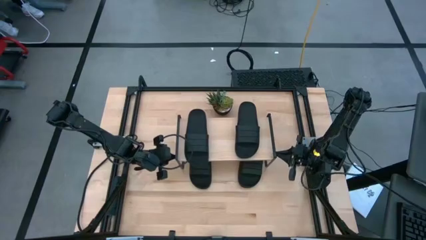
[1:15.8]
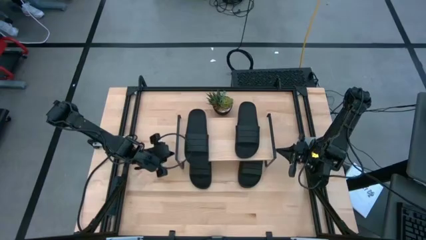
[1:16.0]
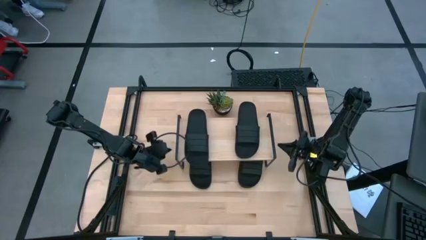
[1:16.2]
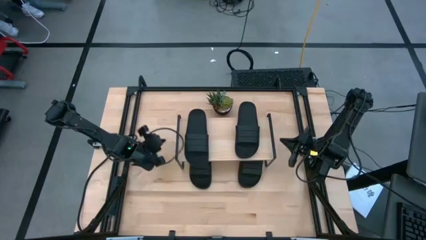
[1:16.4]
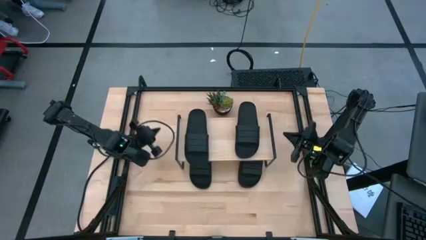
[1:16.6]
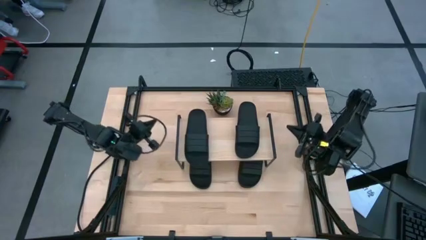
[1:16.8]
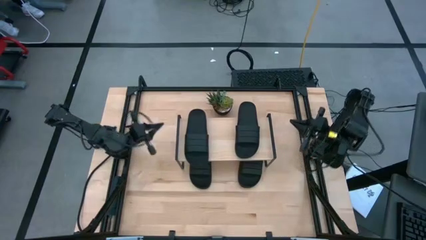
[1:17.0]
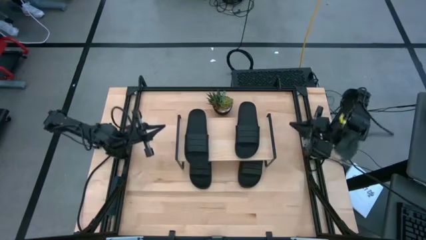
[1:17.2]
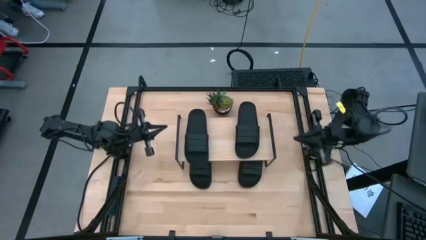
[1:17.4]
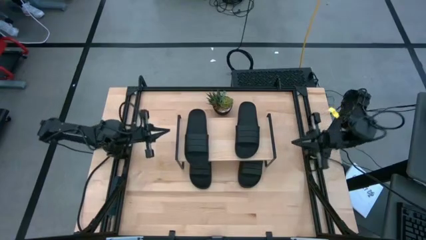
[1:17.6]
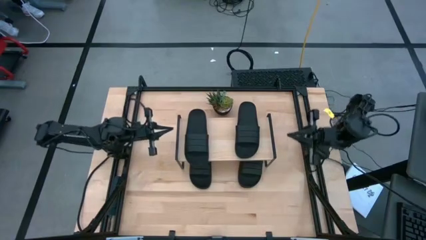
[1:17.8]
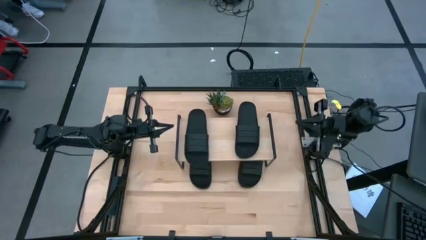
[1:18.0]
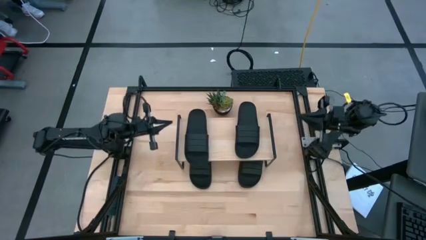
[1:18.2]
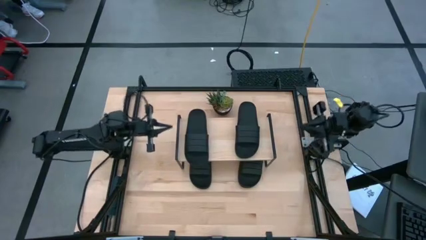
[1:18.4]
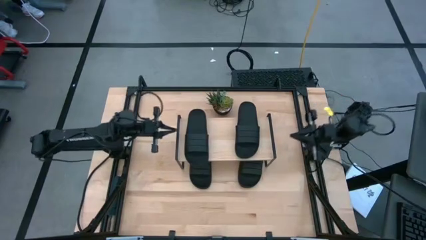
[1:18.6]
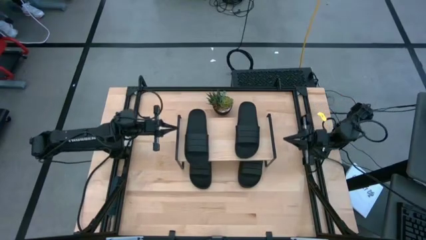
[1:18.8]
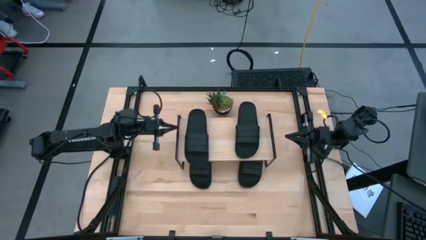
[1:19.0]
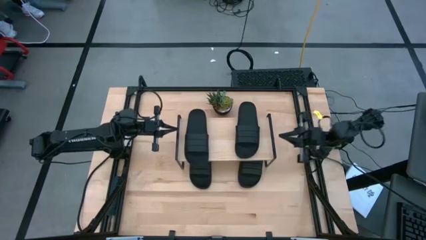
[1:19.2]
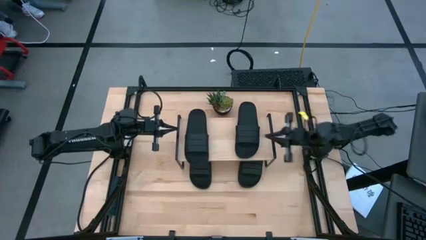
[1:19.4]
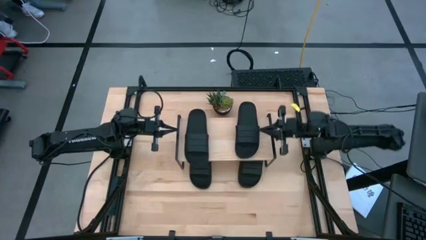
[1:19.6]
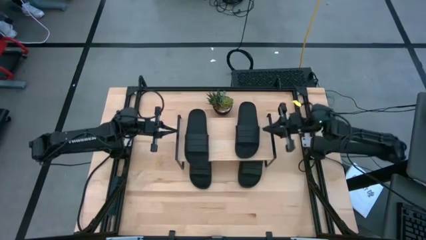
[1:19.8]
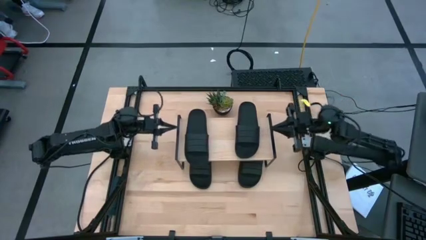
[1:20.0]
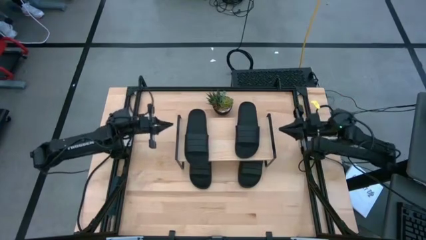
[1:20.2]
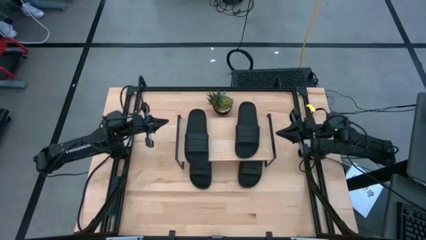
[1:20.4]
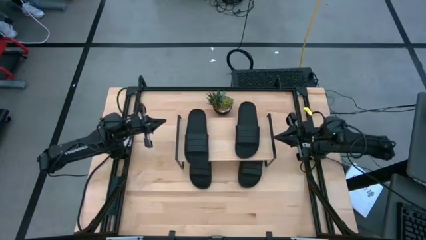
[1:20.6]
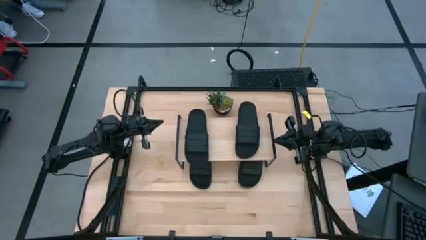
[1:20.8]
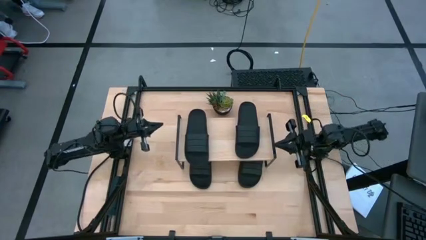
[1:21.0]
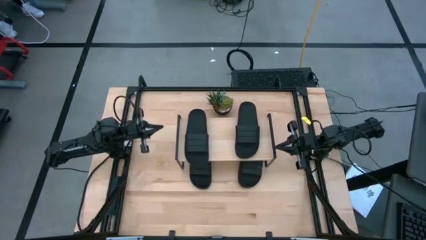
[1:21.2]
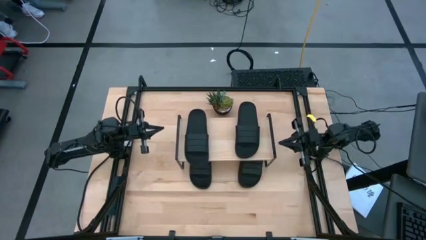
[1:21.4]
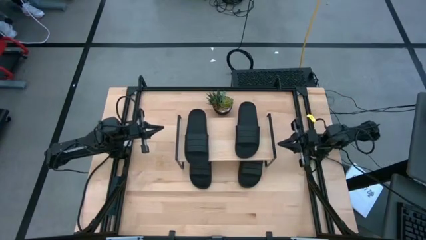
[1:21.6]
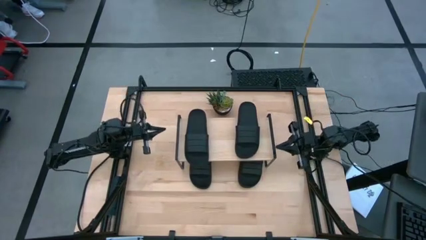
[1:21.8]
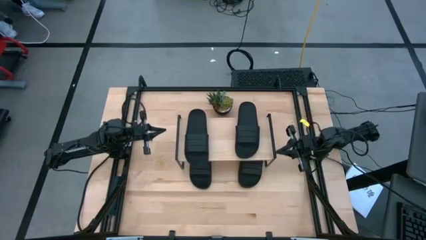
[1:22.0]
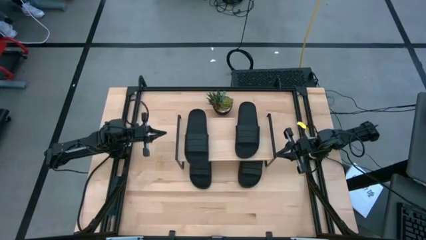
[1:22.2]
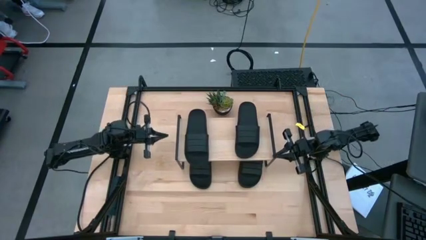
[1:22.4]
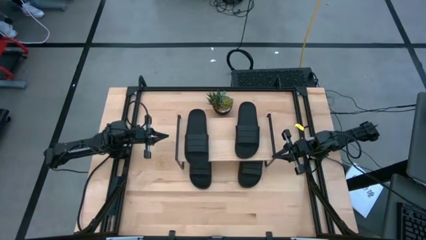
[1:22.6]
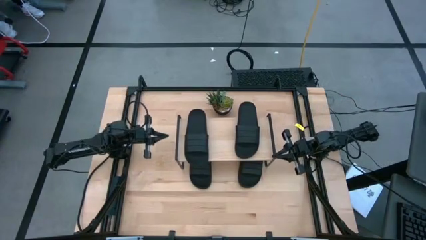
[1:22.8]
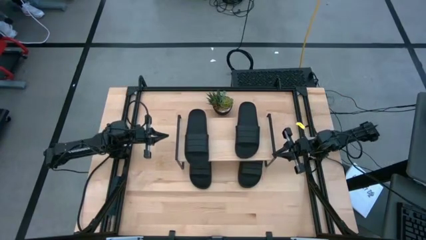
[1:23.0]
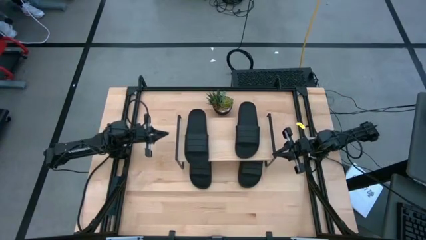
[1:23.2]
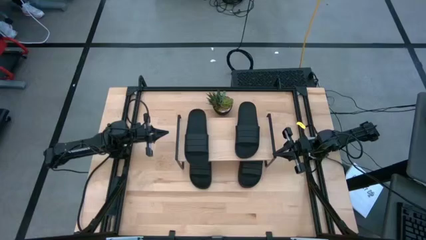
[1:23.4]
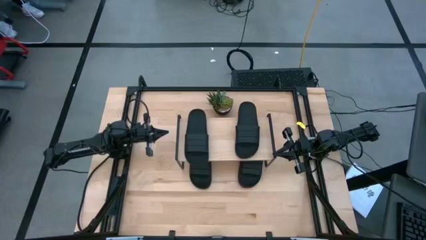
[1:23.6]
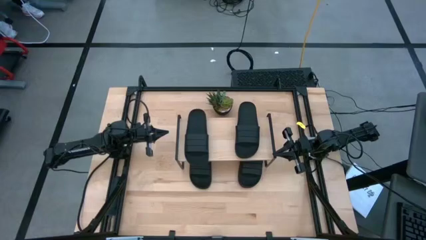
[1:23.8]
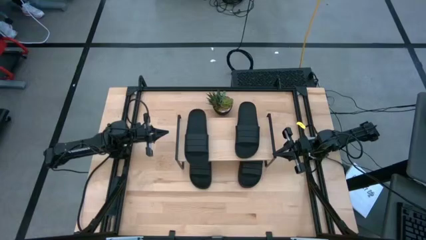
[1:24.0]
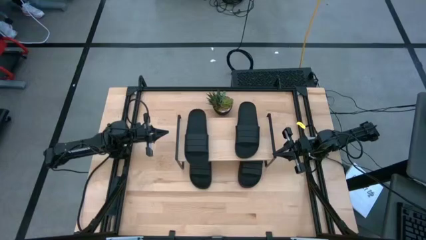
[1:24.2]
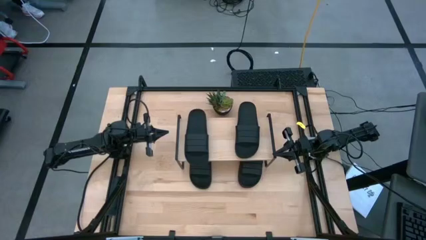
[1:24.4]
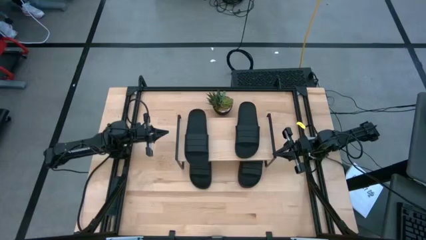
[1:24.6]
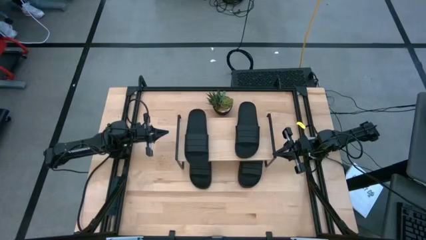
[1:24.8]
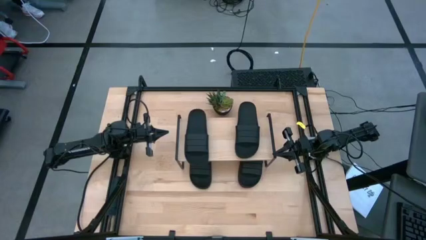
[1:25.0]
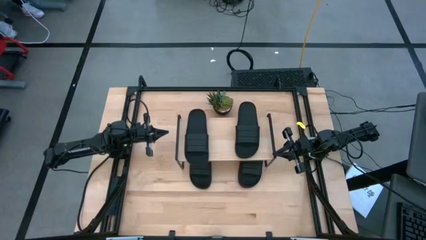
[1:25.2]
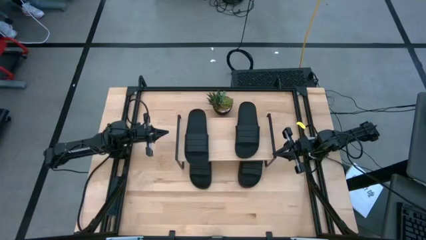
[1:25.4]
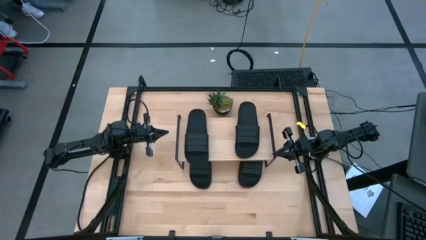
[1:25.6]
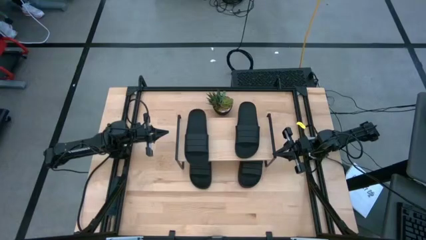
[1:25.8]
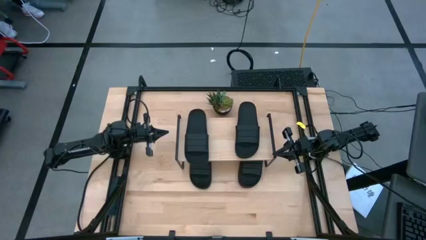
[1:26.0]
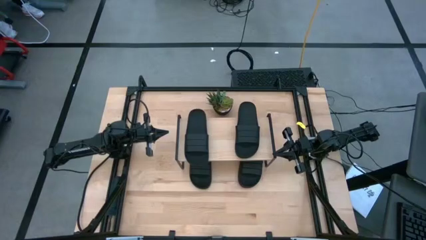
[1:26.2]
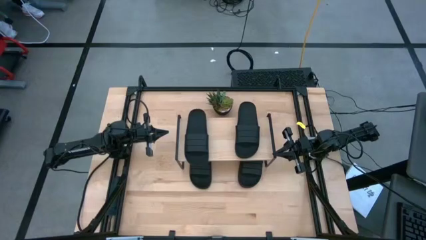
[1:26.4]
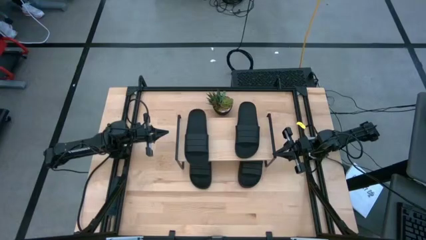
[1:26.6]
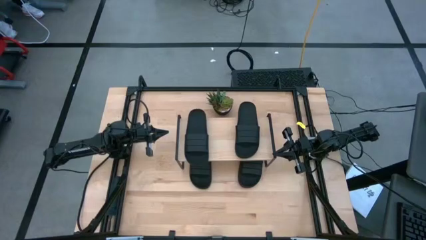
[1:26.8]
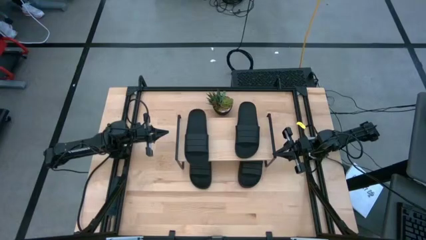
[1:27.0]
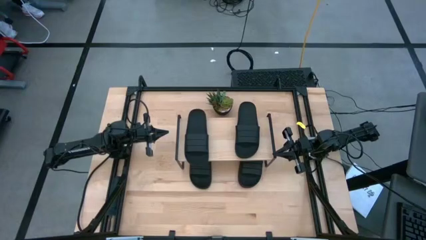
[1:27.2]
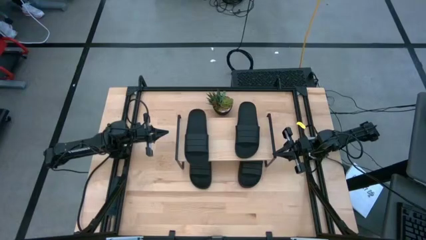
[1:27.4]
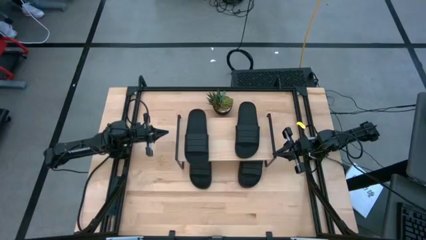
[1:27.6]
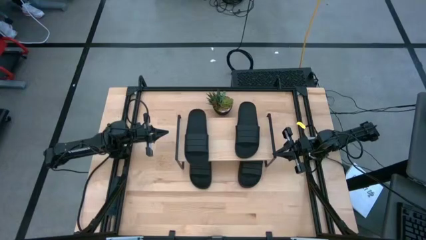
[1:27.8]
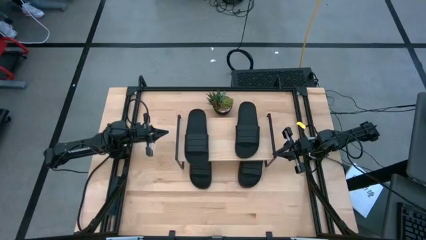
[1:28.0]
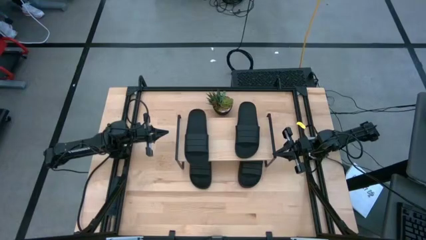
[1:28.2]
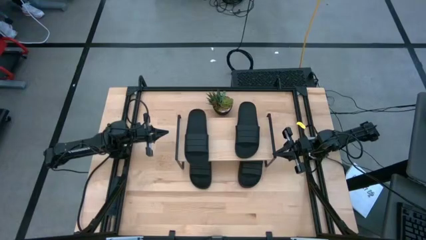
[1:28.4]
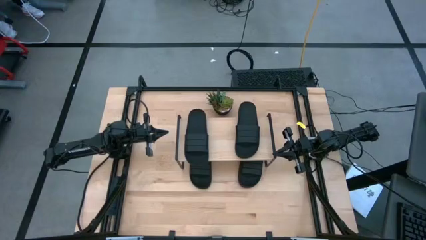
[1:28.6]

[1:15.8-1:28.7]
Task: Pick and place slides into the shelf
Return to Home Position
